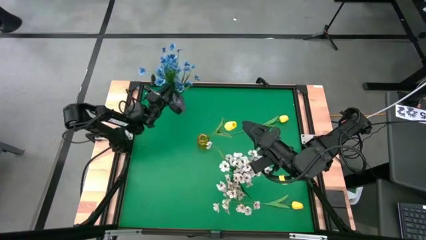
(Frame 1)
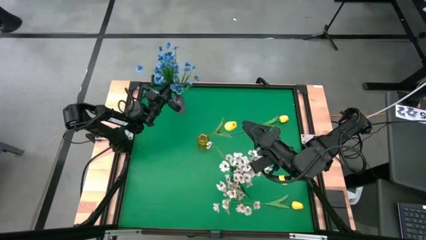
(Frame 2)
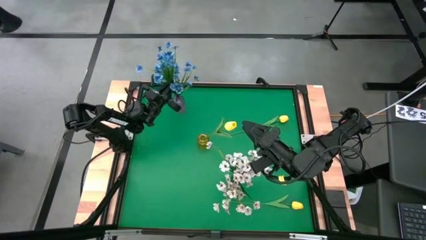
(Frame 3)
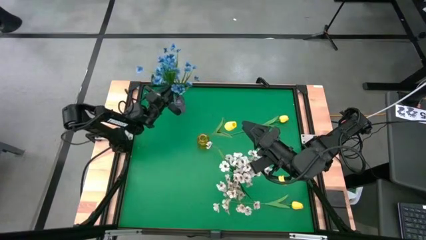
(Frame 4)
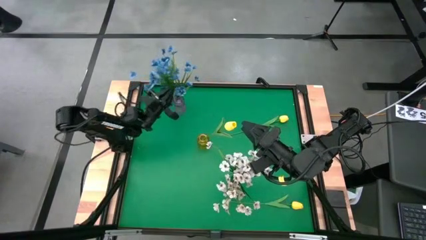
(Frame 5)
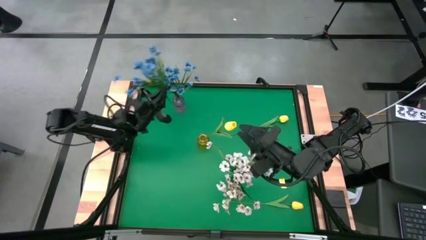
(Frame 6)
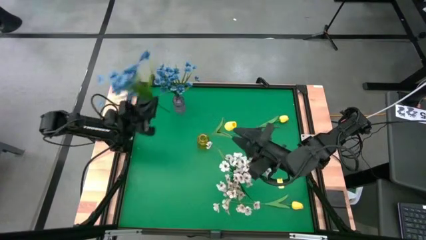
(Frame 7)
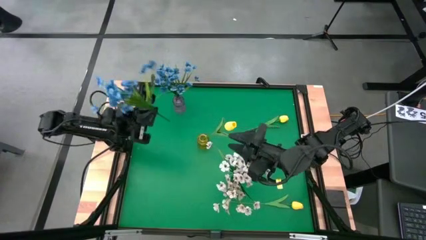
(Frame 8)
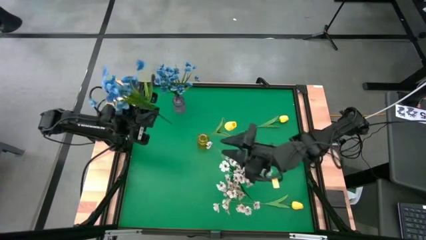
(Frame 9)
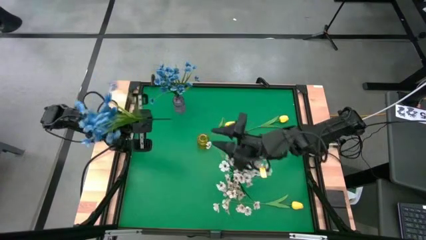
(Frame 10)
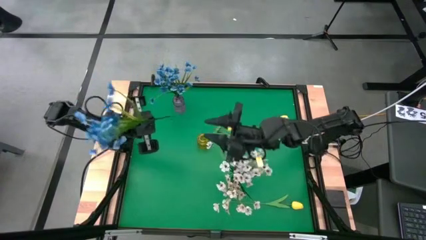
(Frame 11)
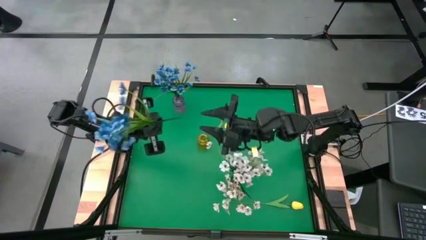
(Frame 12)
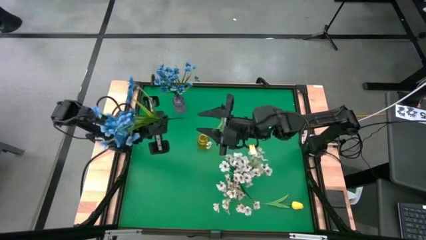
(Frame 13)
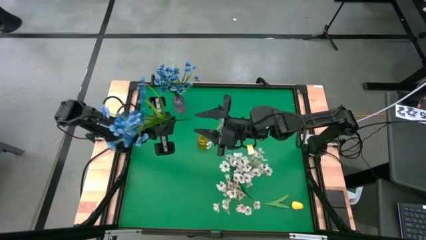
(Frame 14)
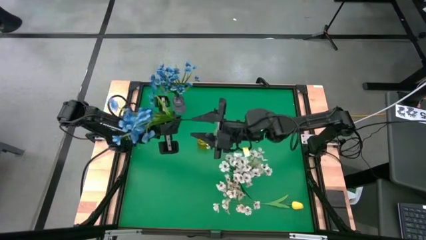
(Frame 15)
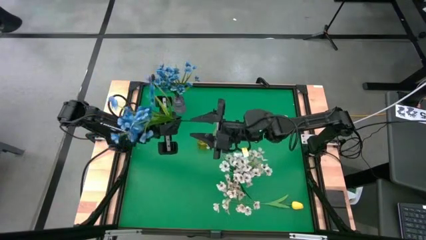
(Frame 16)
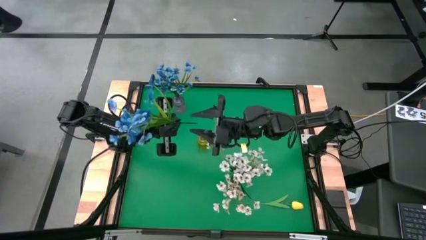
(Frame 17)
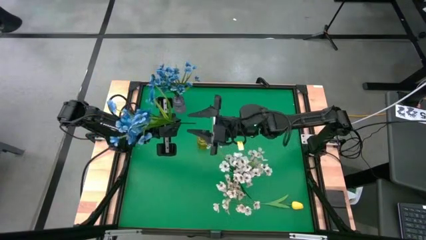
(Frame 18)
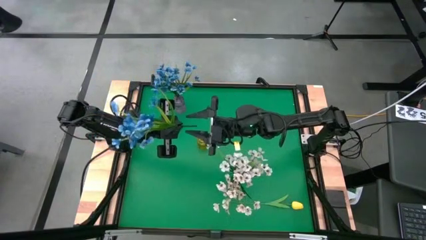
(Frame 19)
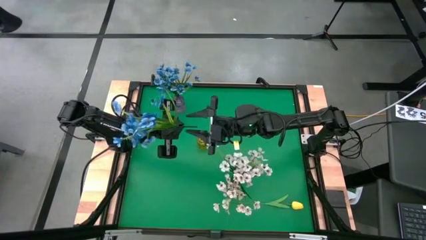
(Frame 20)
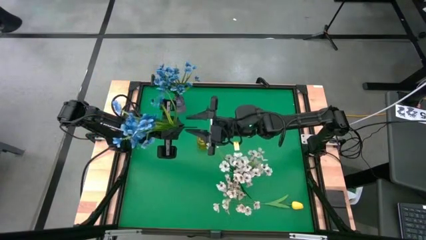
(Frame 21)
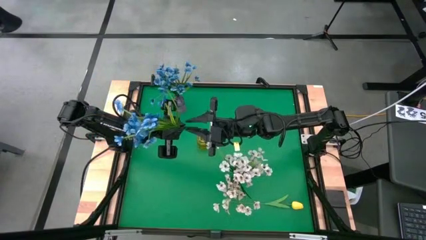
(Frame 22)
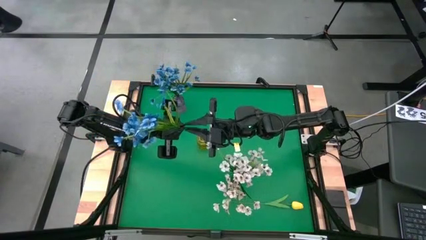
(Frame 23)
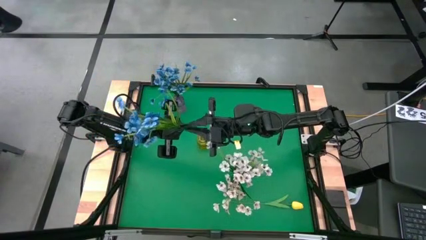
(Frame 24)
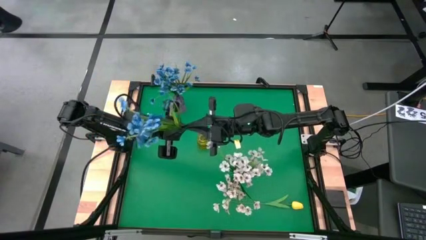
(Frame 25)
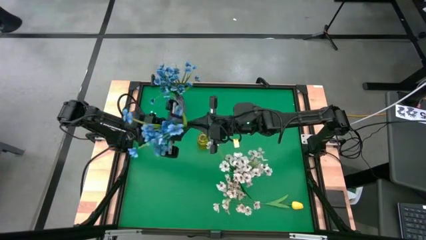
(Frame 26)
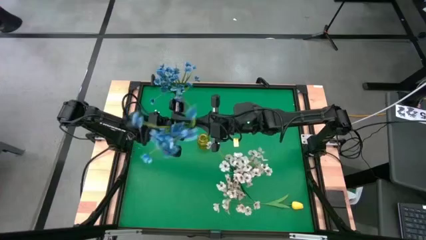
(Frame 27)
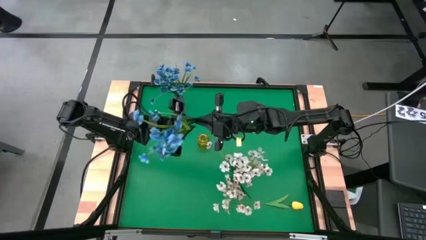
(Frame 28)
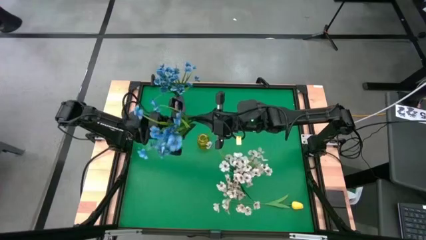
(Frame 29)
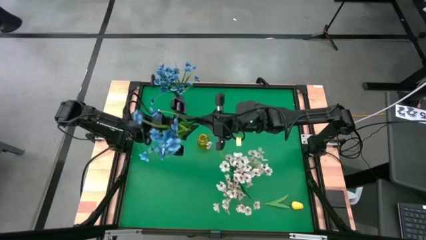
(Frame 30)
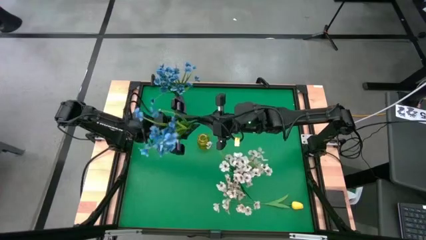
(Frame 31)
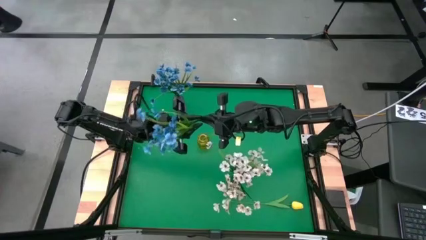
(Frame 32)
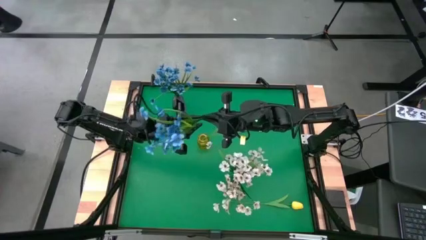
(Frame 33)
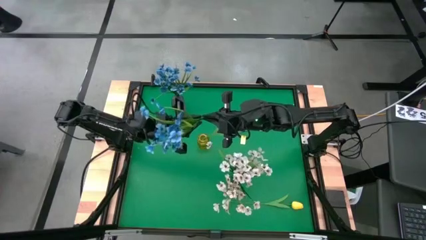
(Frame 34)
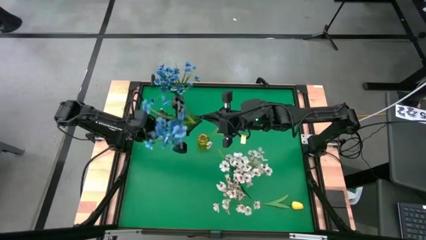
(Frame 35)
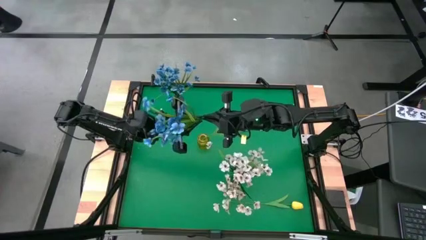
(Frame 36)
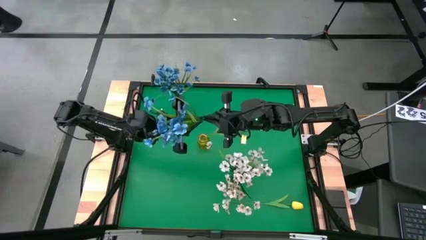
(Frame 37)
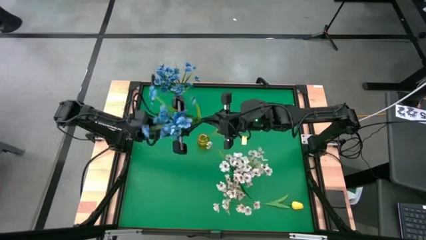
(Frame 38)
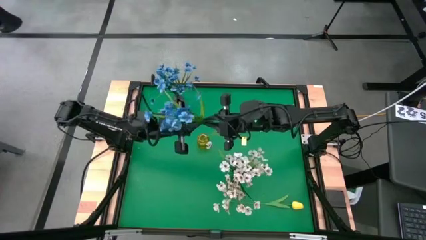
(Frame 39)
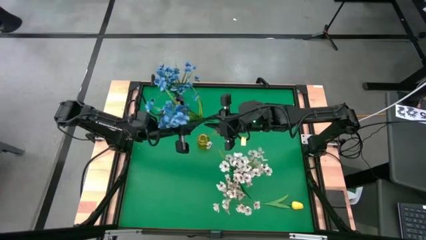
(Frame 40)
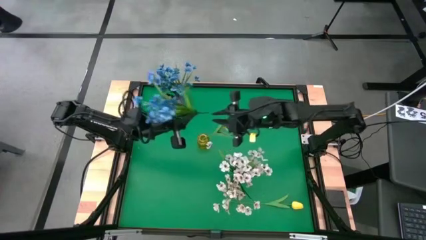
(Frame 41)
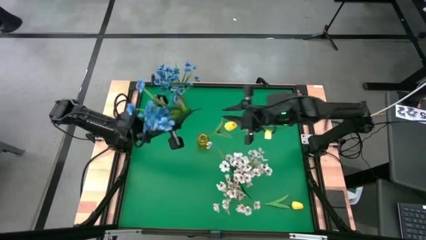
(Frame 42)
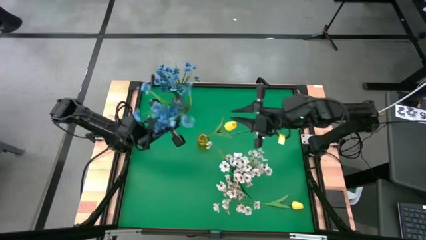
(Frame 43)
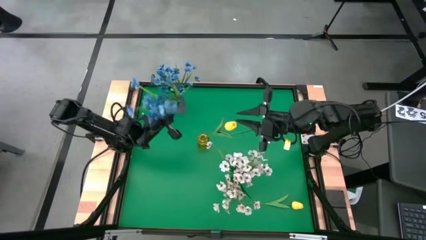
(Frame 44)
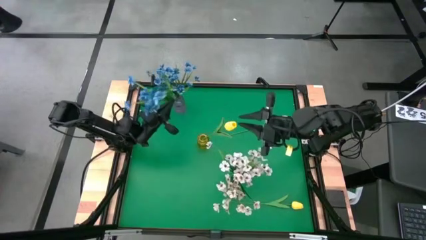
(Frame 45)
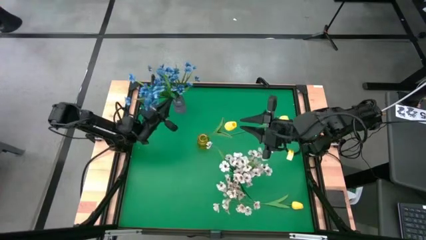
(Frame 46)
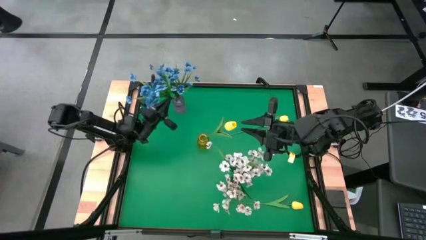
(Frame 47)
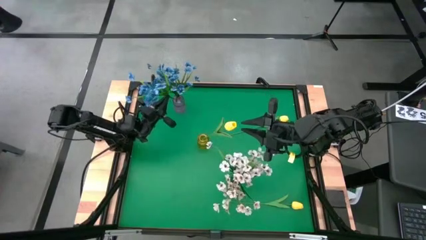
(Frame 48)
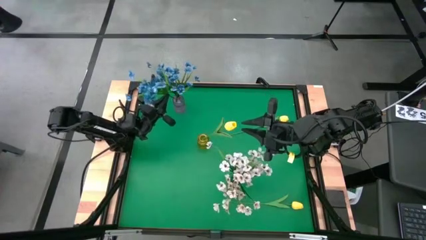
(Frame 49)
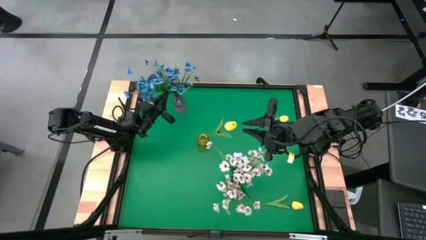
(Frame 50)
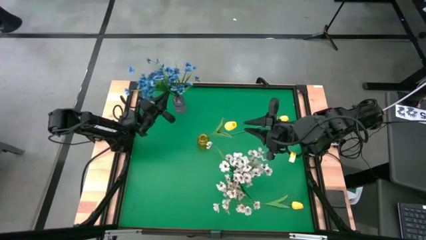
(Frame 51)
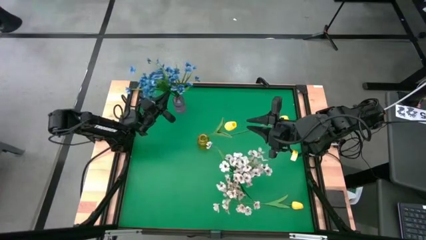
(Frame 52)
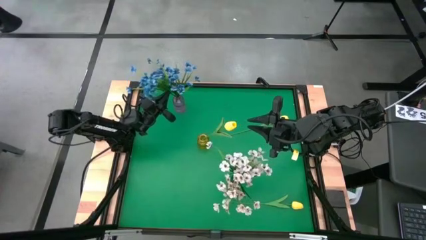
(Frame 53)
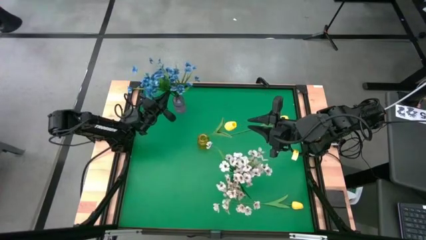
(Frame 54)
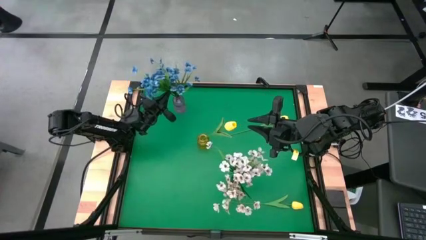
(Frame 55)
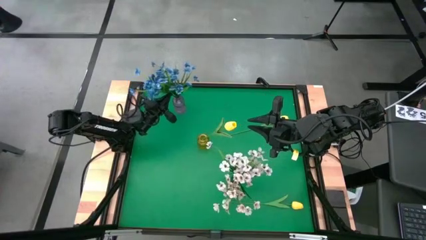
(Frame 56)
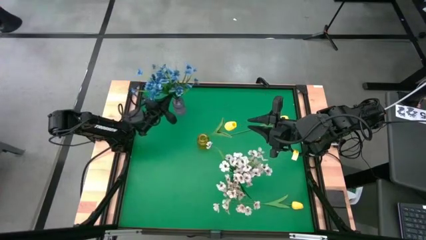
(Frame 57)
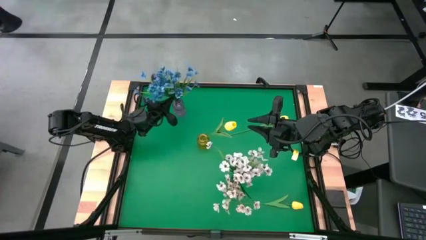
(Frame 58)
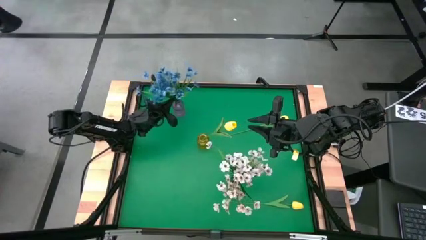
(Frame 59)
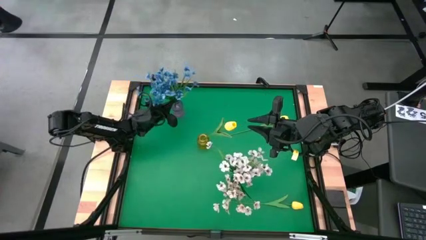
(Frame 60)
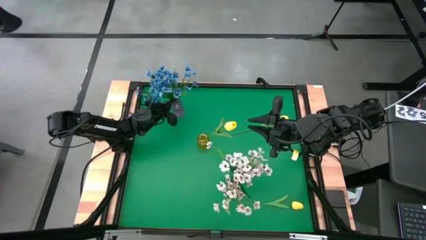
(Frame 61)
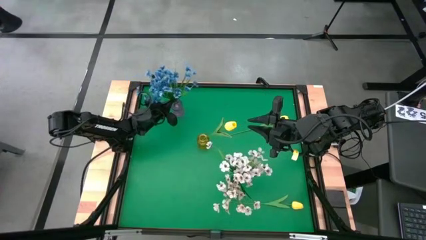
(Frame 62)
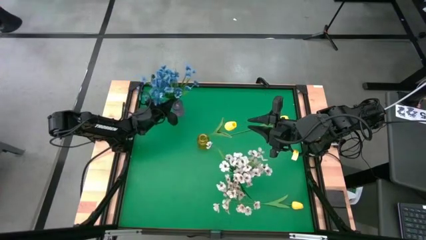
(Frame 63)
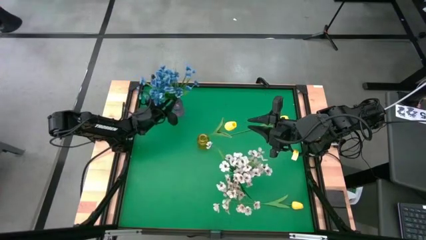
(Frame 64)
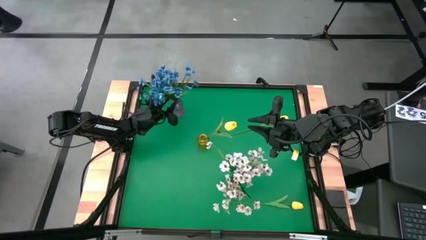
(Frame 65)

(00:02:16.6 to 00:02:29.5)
Task: Sort flowers into vase by color
Put the blue flowers into the purple vase

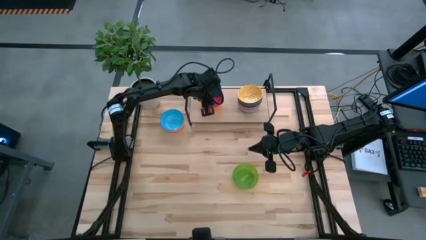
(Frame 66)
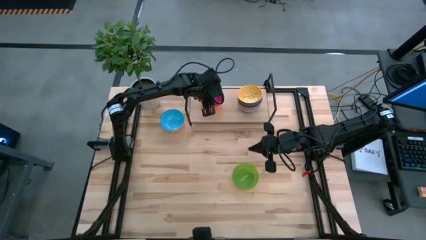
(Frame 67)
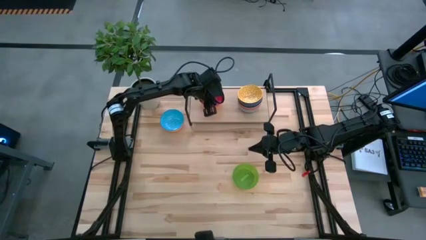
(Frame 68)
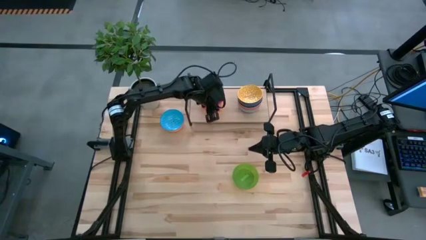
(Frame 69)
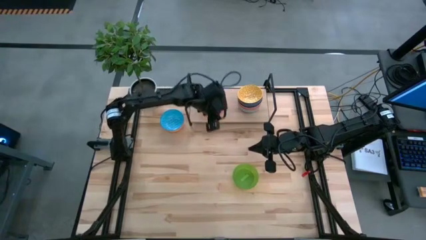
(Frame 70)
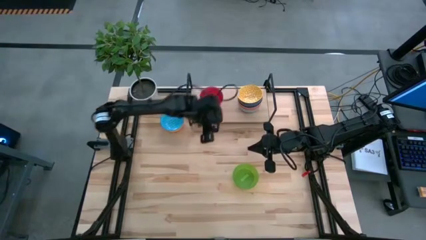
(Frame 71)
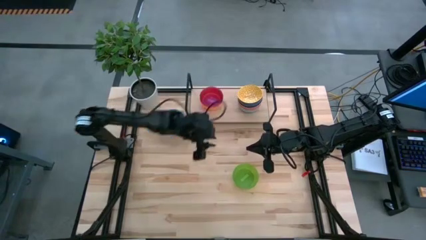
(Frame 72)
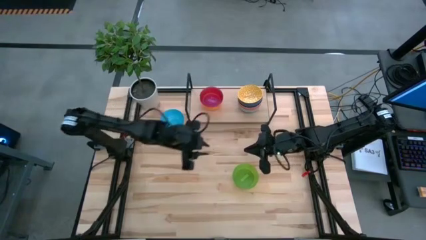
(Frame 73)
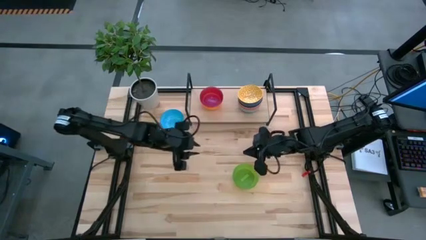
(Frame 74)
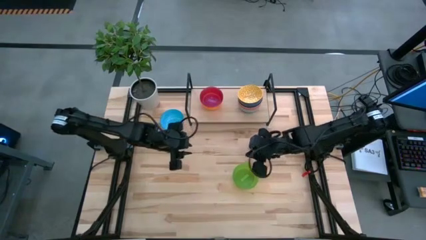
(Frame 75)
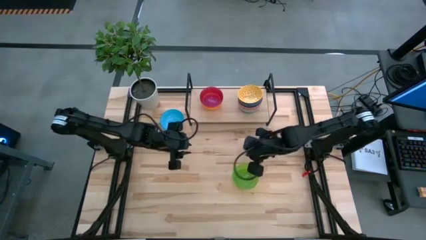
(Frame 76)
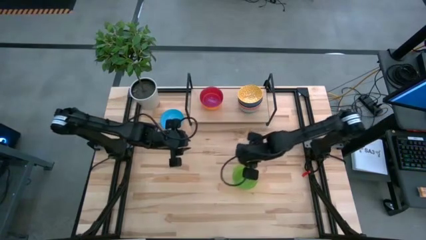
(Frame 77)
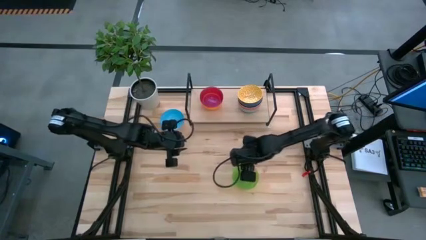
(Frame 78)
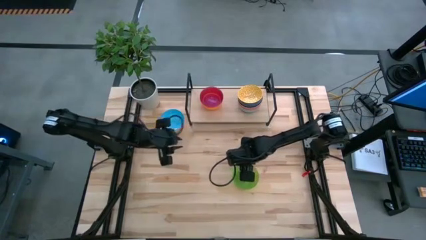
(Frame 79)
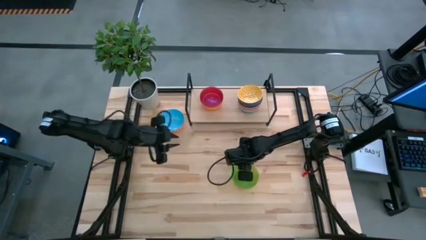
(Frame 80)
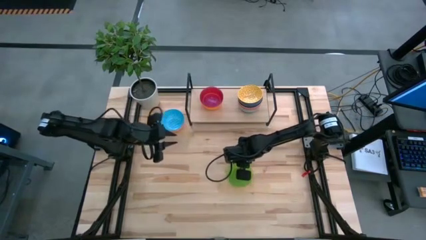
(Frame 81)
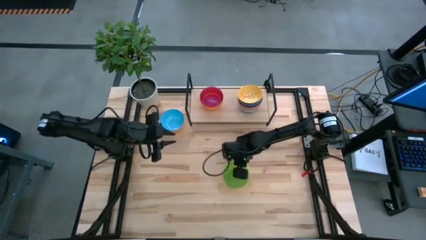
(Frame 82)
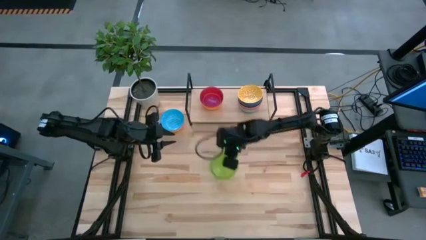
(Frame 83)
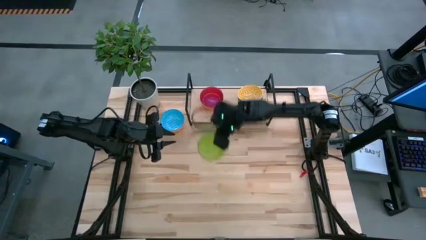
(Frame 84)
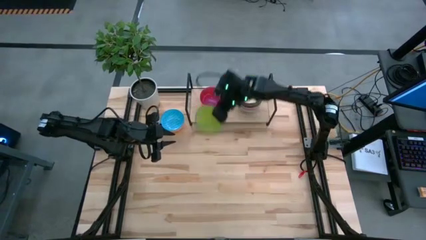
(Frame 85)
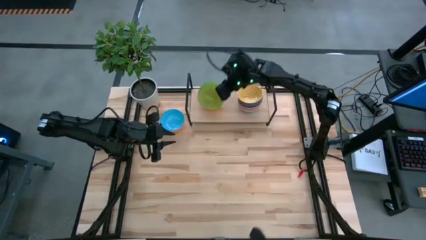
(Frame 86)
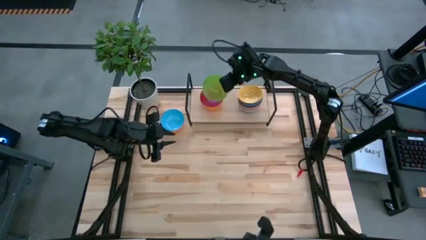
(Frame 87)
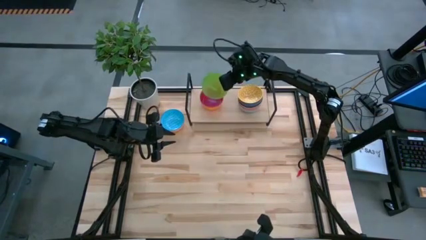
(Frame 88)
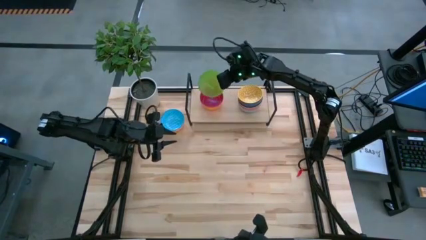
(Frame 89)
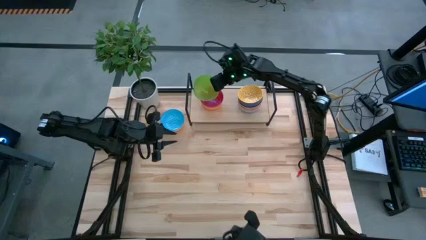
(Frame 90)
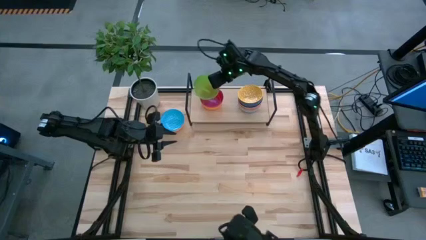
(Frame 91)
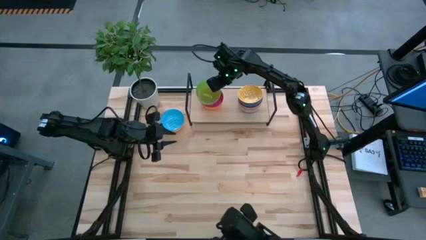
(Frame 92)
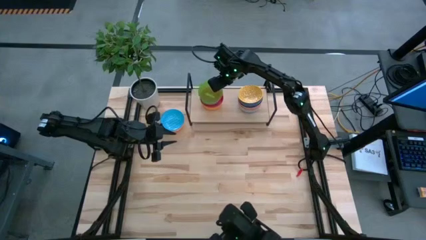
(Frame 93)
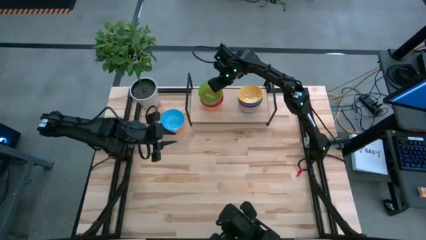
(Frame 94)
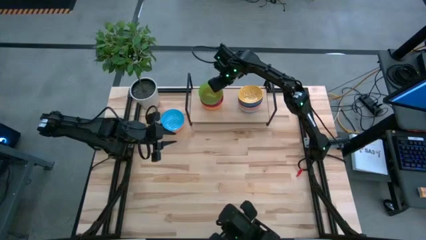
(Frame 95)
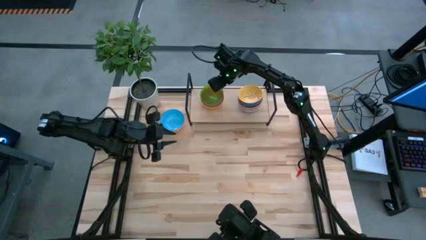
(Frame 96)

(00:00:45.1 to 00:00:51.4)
Task: Place and stack bowls onto a shelf
Stack the green bowl on top of the violet bowl on the shelf
